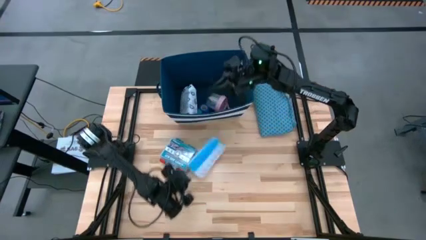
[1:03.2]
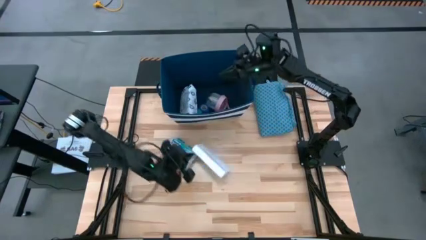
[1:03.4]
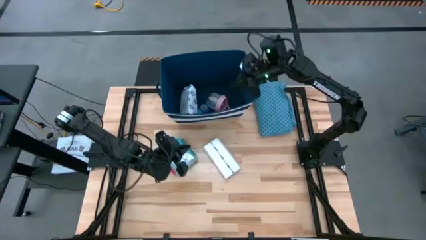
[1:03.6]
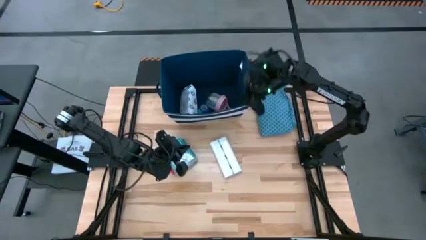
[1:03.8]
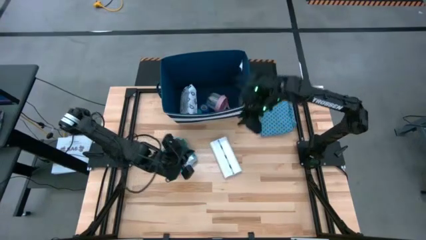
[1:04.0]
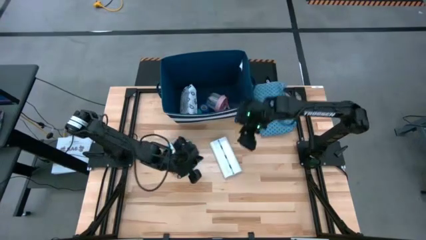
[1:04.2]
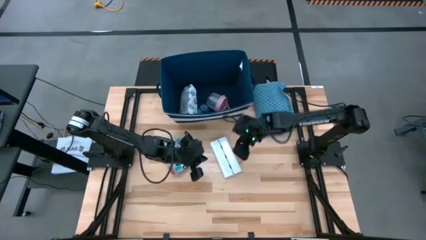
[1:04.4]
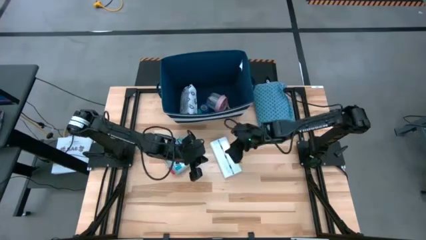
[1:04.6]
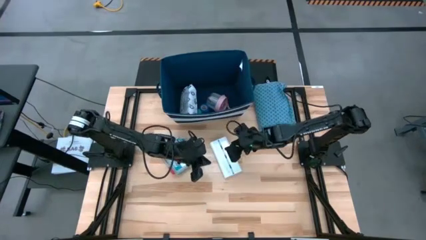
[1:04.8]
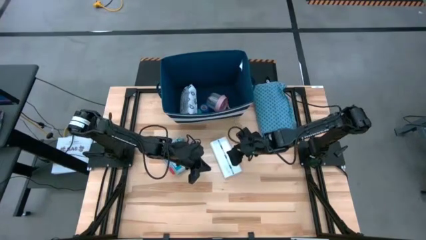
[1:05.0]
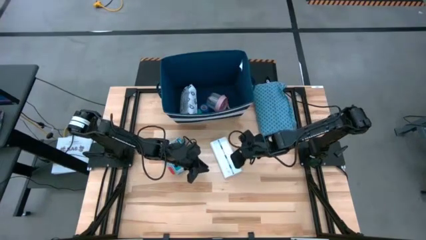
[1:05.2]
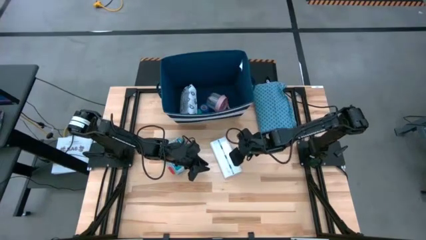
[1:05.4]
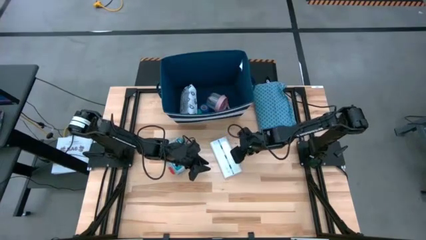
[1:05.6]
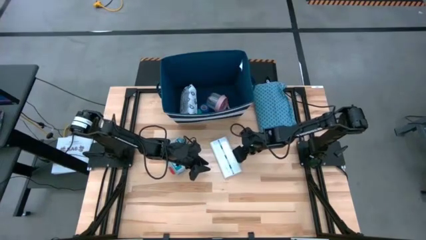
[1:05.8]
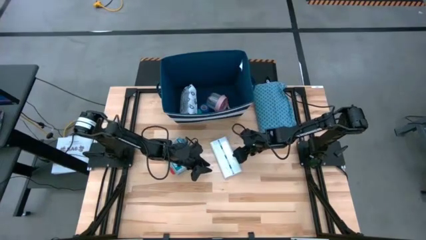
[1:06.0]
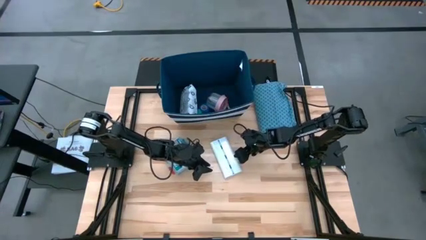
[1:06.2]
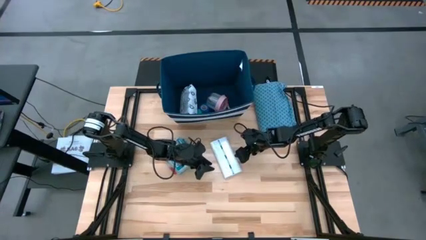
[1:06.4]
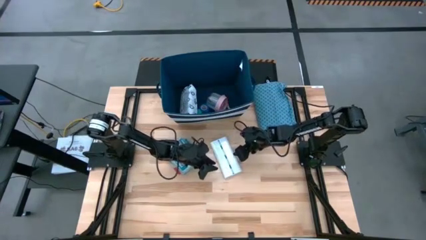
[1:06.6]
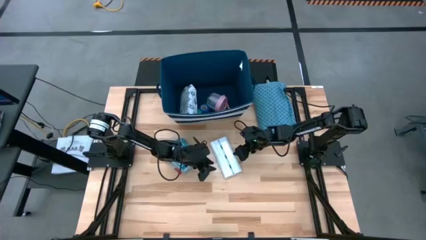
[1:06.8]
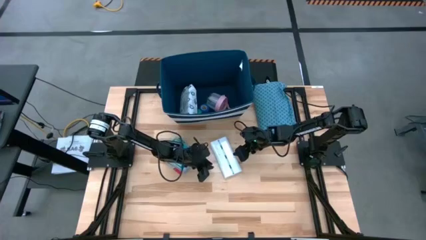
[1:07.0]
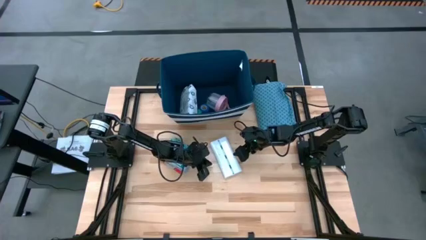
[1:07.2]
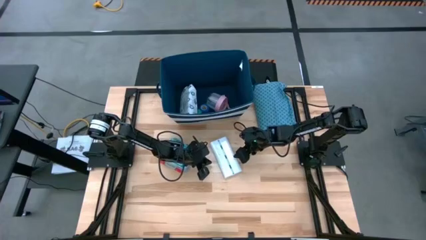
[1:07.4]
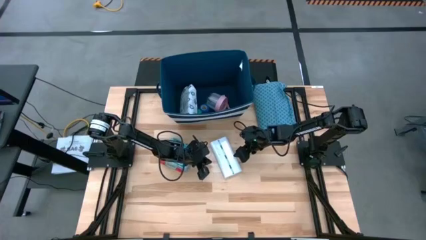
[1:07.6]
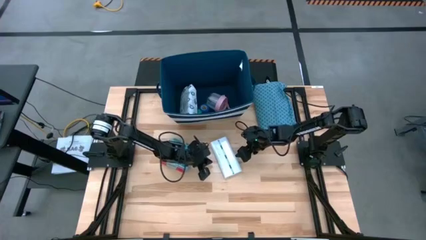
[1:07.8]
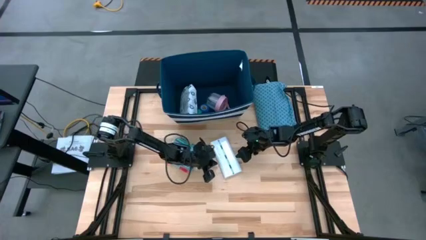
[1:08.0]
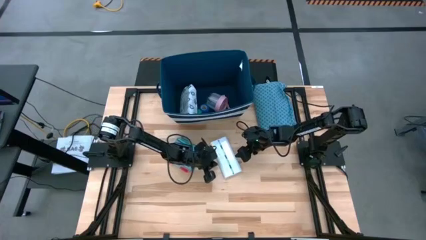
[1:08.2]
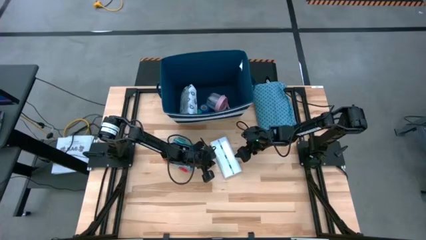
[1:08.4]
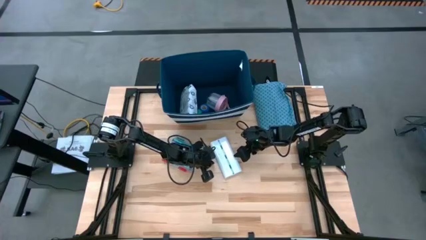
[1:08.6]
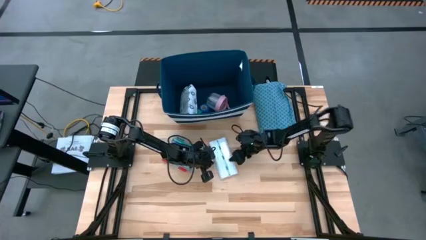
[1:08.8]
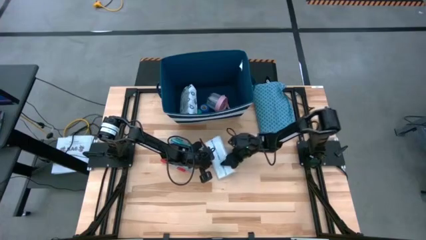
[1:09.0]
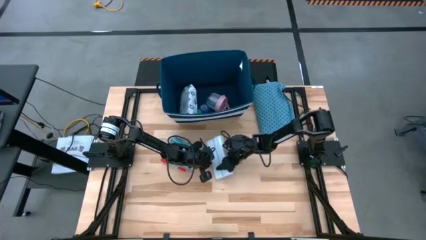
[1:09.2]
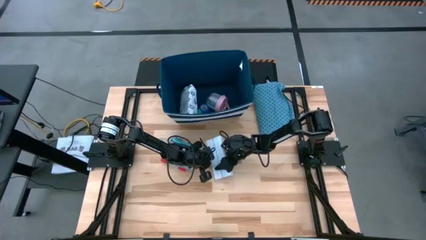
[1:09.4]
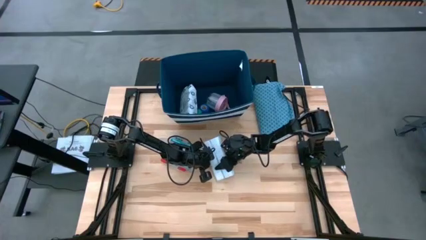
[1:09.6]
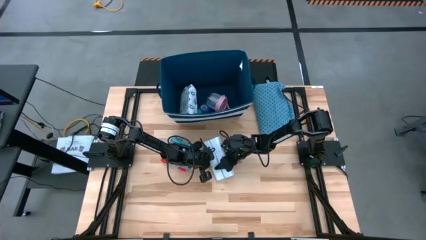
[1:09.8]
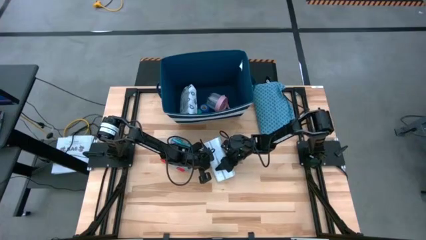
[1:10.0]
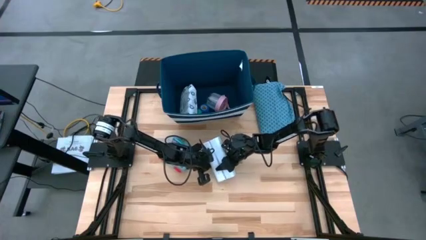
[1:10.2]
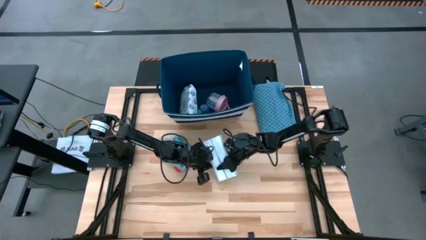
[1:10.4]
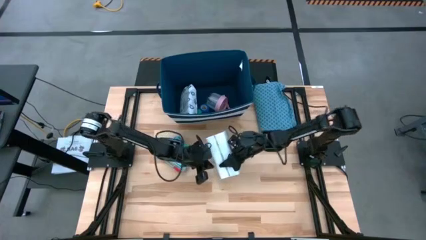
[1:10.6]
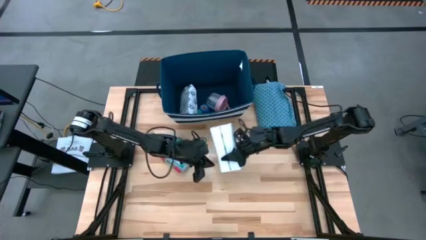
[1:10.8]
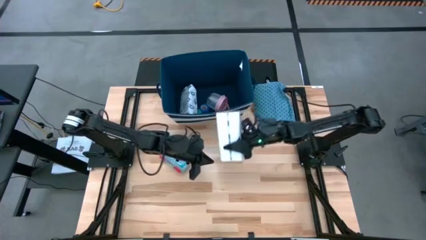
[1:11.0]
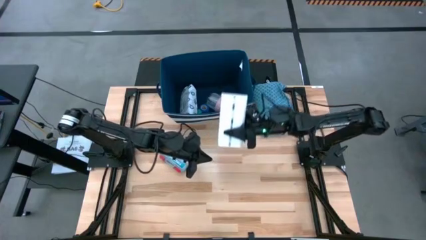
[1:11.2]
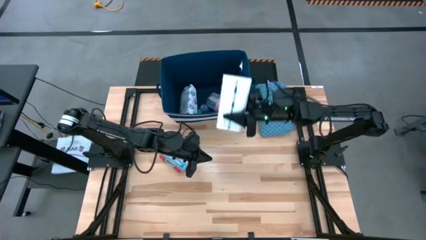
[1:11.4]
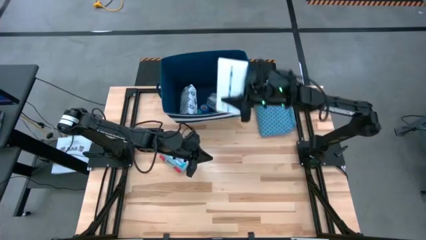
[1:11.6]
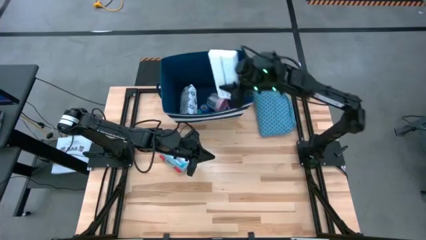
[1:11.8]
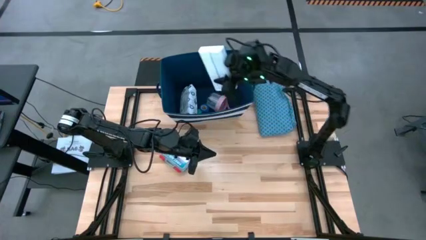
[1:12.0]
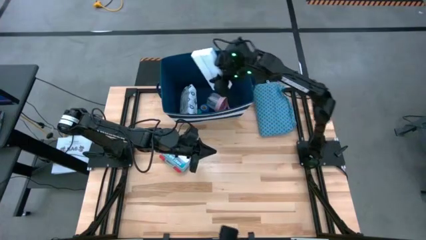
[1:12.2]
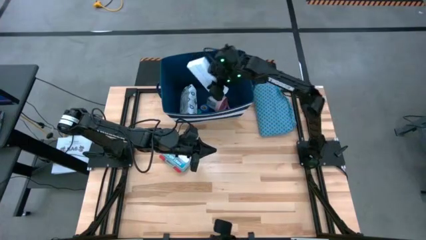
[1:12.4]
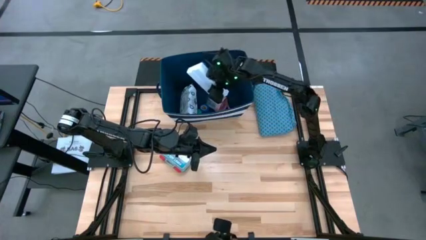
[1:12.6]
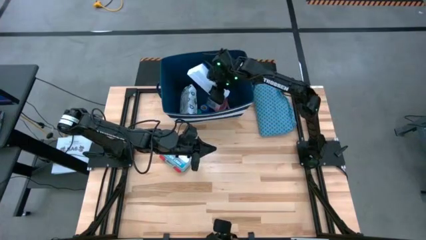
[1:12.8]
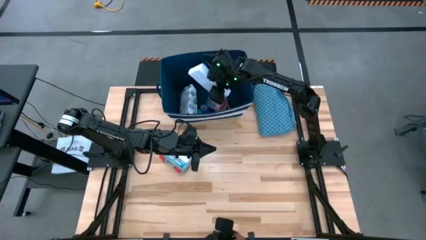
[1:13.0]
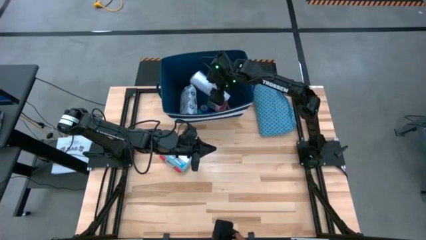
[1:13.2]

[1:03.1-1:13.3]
Task: Pack medical supplies into shirt
Put the pill organizer into the blue patterned shirt
